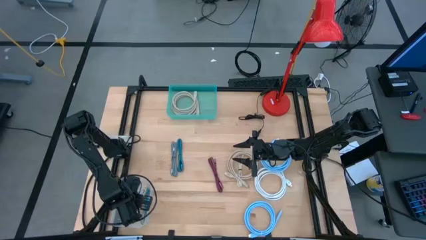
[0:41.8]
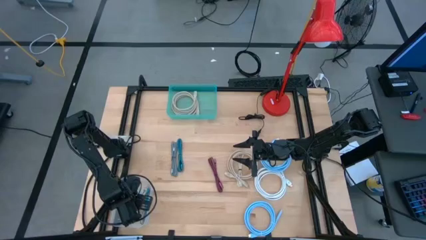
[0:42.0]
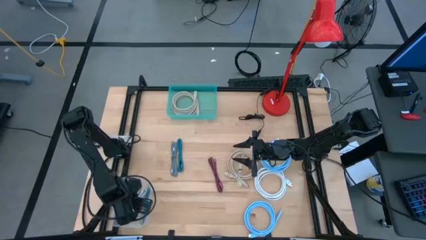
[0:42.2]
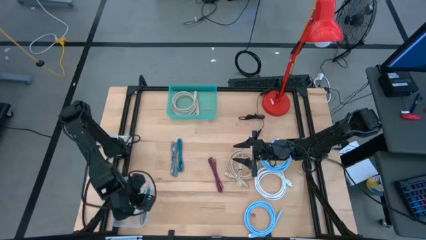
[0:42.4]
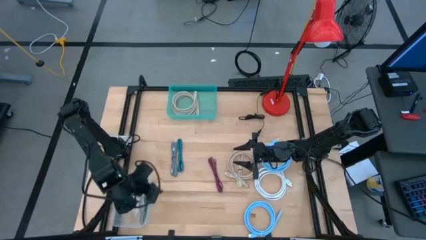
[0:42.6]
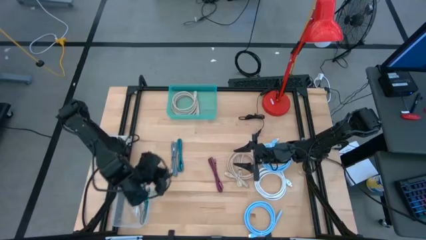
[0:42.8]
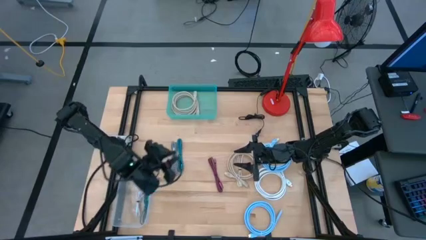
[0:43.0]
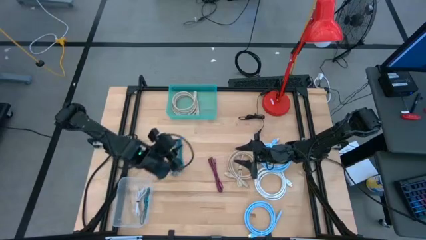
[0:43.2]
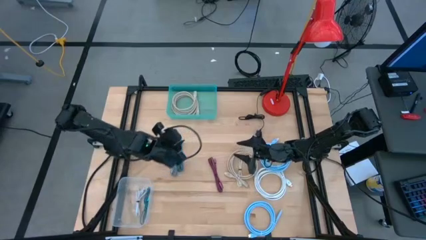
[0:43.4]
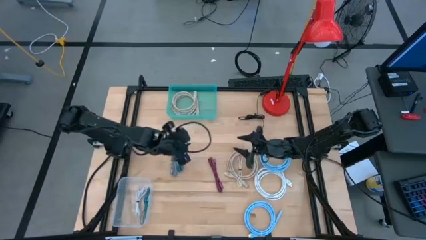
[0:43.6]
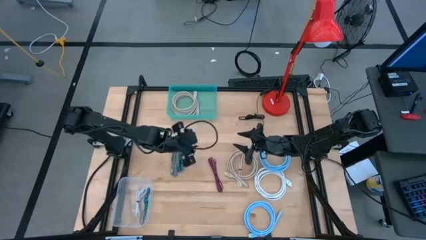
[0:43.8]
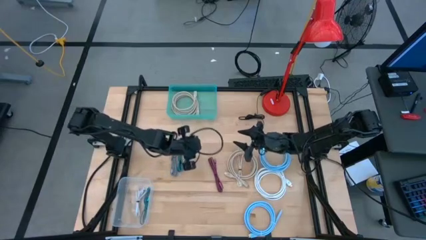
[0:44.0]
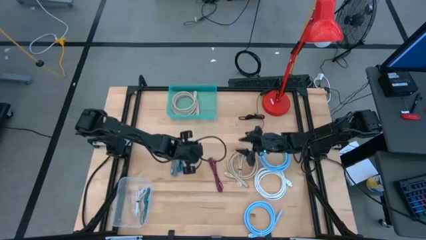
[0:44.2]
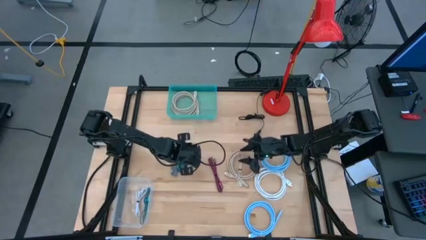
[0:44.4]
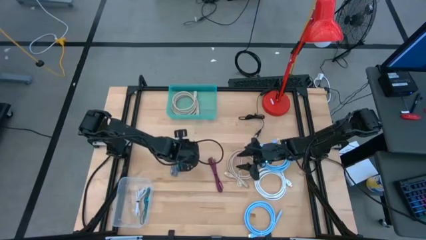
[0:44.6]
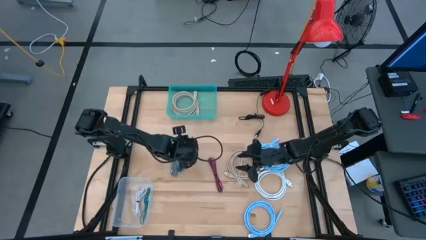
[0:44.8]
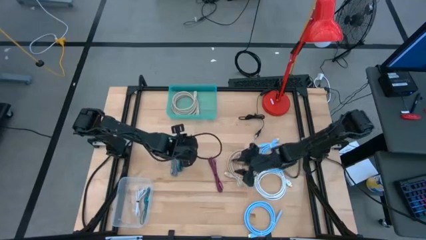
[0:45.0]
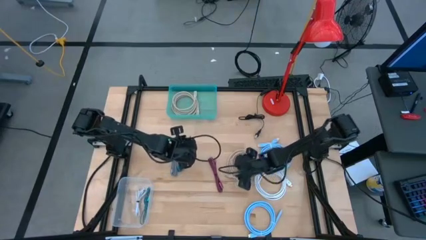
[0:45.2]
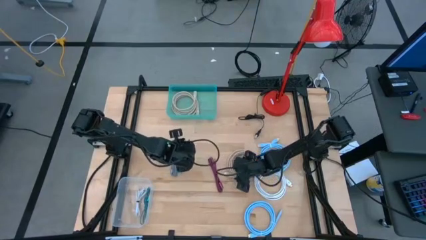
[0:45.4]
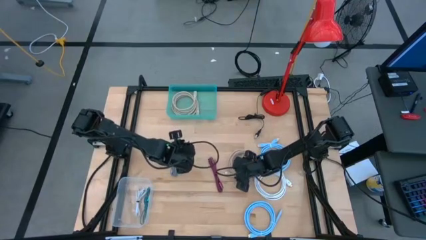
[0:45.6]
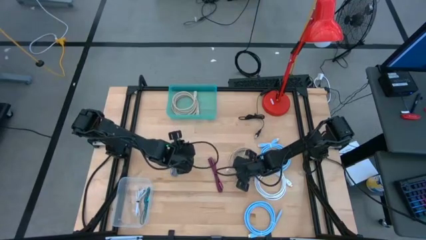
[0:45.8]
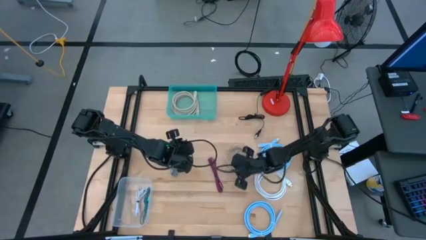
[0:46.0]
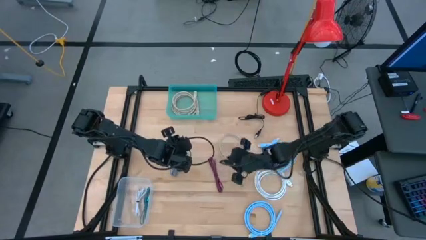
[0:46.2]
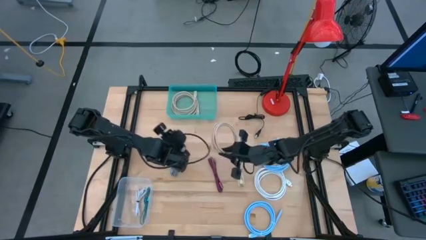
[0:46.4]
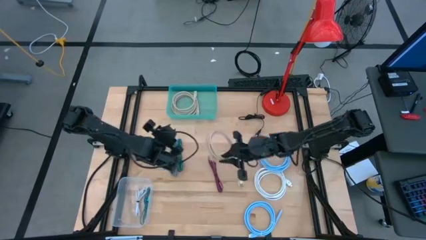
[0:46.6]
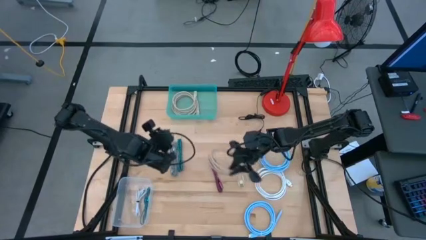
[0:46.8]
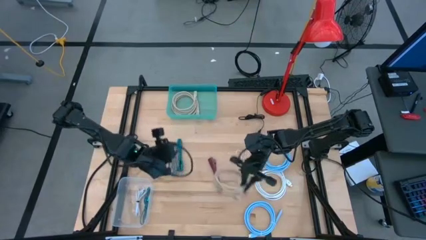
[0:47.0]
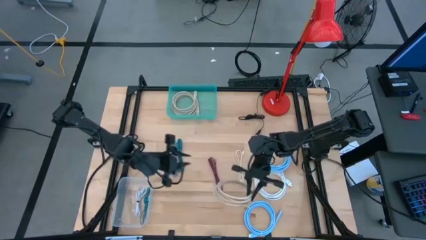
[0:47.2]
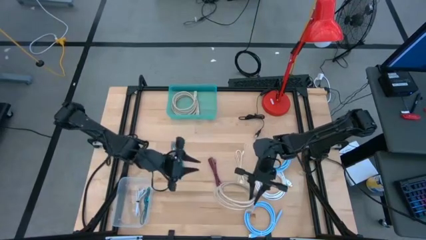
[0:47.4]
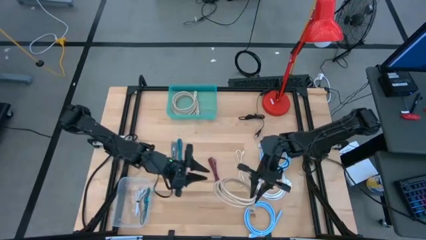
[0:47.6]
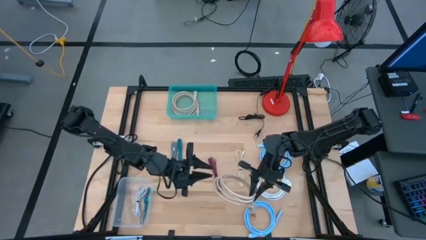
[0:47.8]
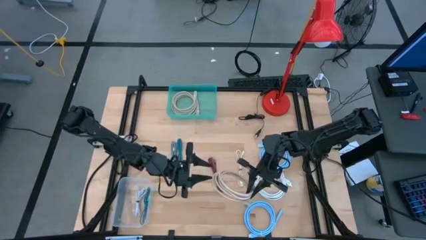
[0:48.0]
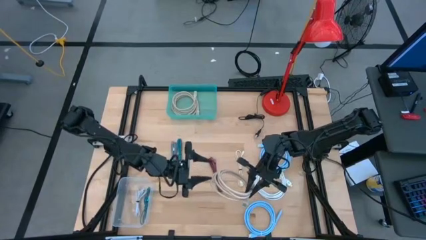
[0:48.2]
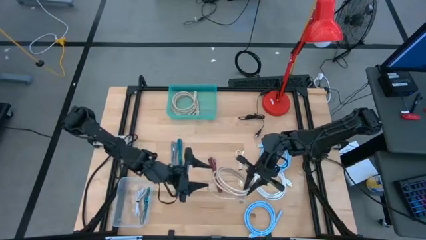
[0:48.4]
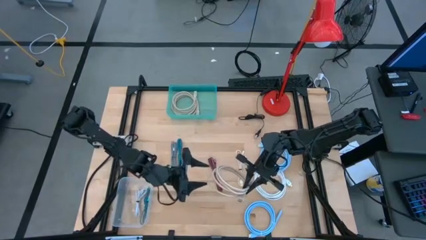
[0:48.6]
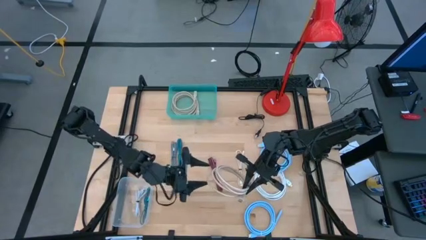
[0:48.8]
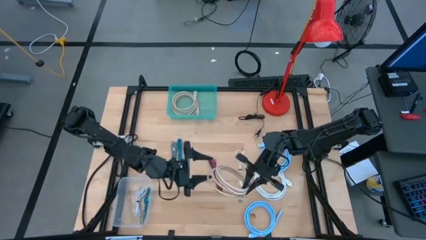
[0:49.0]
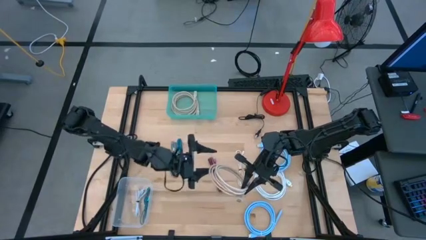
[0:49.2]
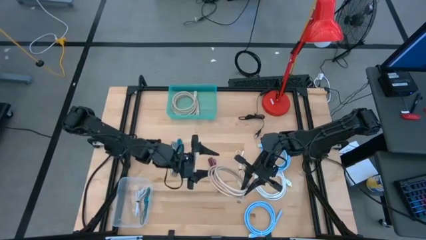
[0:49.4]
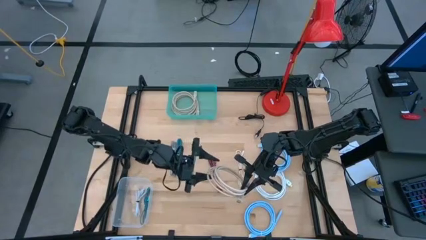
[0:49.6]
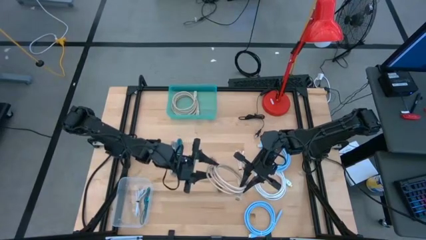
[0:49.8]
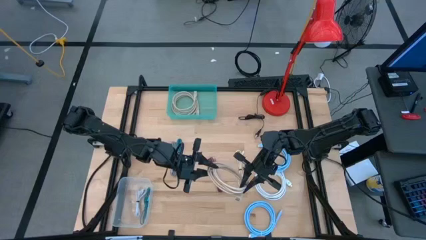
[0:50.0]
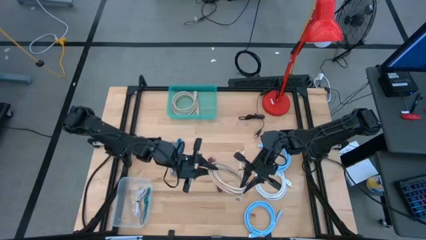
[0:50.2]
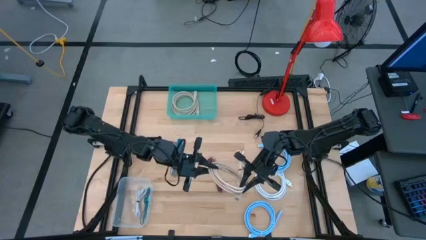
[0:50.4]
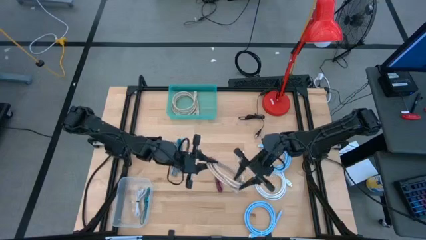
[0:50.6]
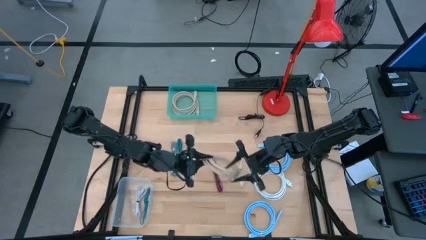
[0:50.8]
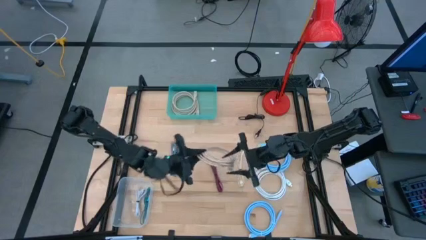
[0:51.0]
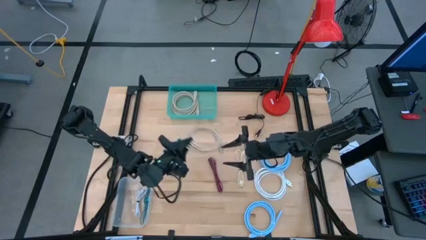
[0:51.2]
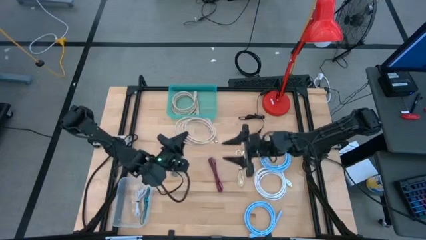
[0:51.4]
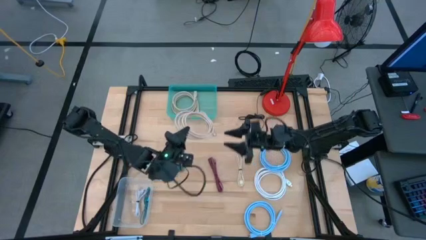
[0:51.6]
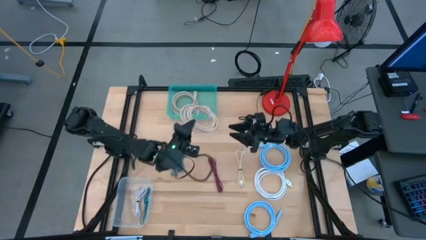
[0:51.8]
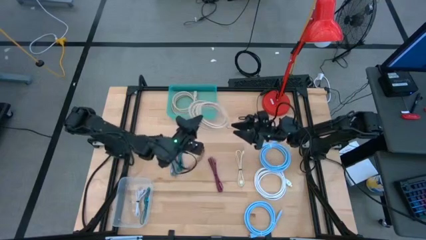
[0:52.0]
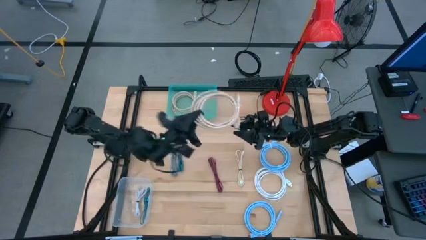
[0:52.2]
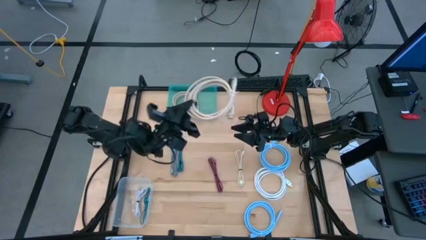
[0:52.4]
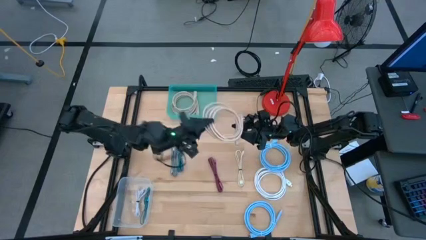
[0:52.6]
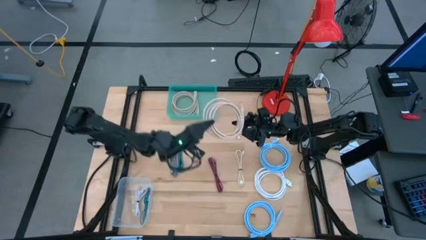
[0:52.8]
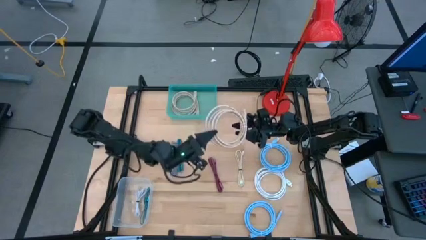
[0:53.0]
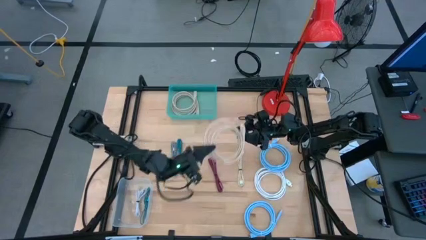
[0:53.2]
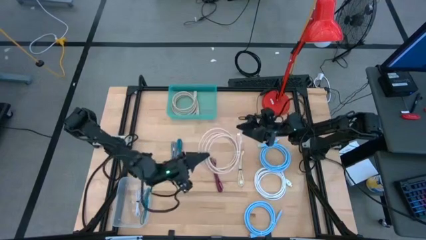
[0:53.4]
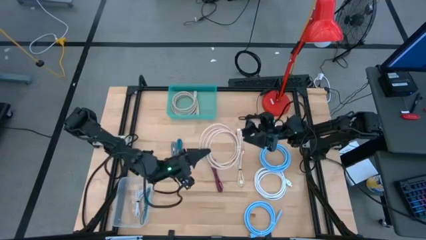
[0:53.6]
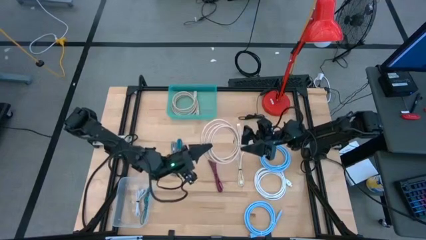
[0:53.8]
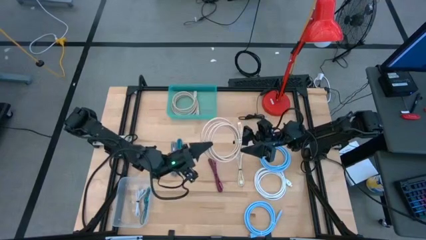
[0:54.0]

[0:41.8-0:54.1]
Task: Pick & Place USB Port
Put the brown HDMI cable into the green bin

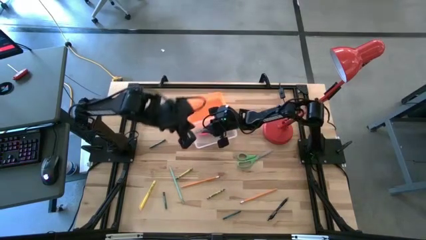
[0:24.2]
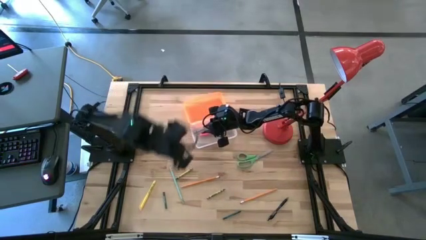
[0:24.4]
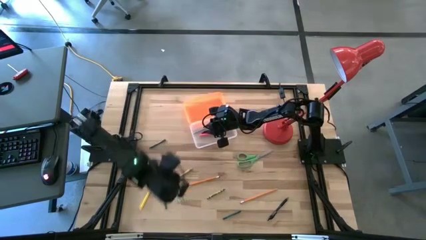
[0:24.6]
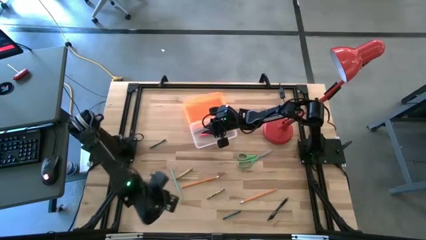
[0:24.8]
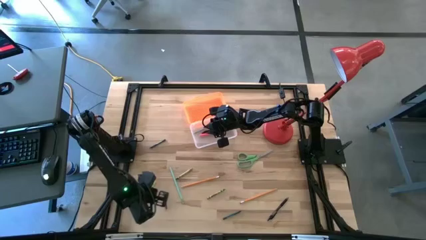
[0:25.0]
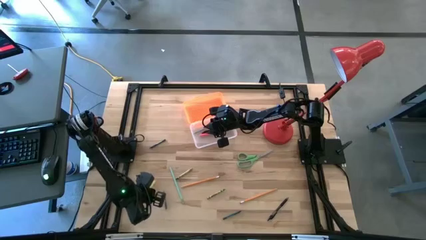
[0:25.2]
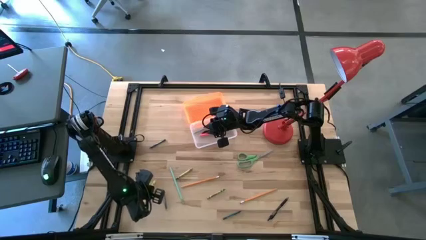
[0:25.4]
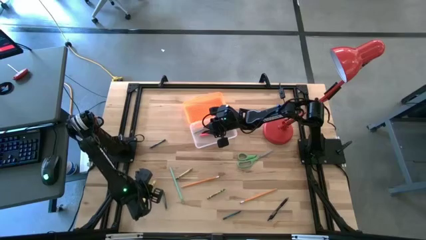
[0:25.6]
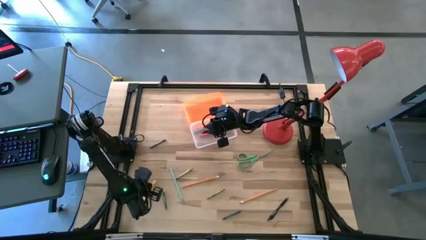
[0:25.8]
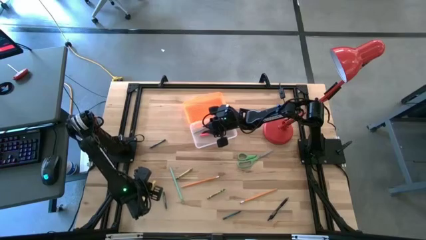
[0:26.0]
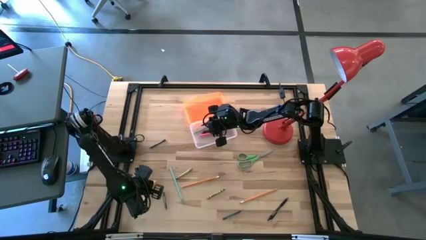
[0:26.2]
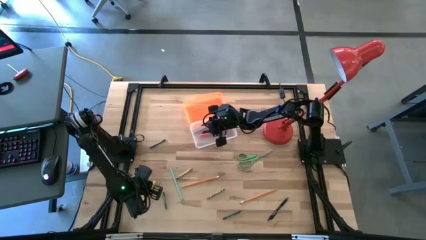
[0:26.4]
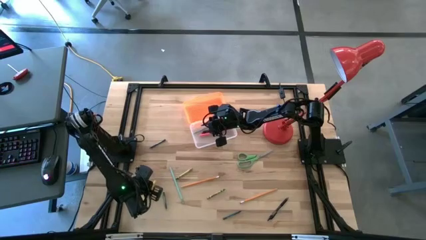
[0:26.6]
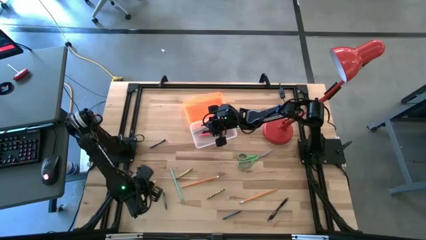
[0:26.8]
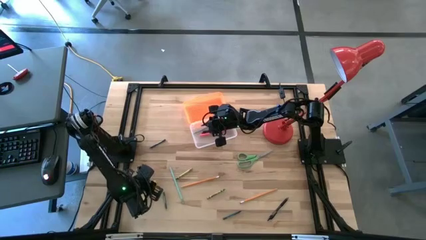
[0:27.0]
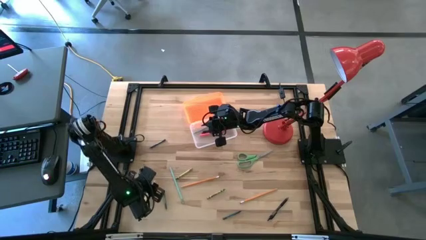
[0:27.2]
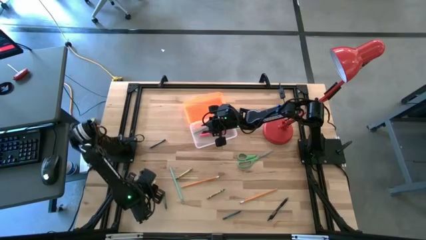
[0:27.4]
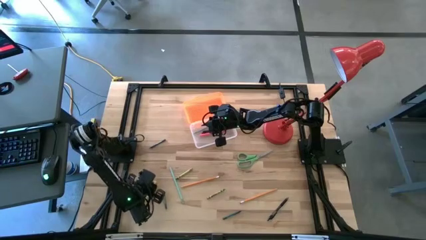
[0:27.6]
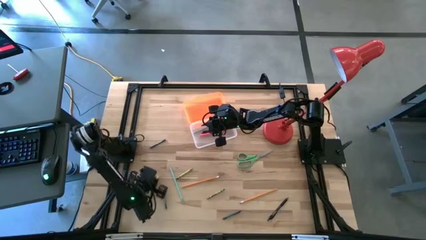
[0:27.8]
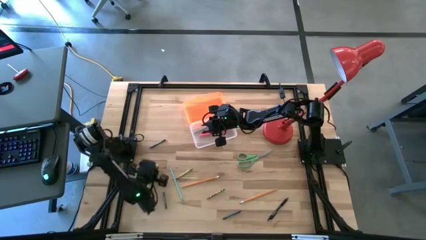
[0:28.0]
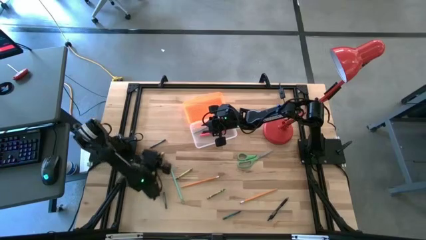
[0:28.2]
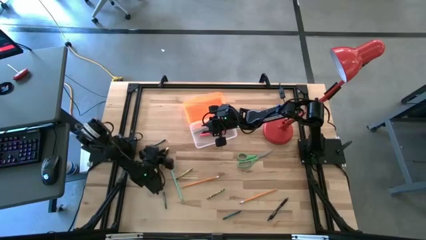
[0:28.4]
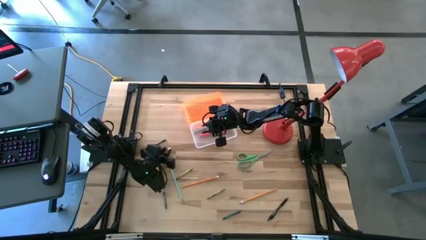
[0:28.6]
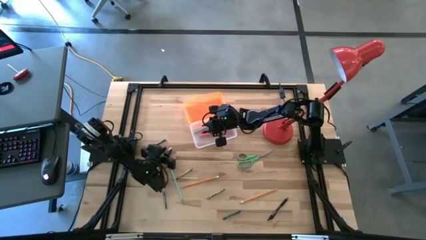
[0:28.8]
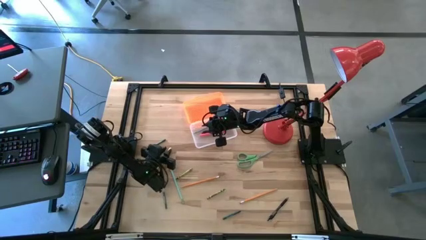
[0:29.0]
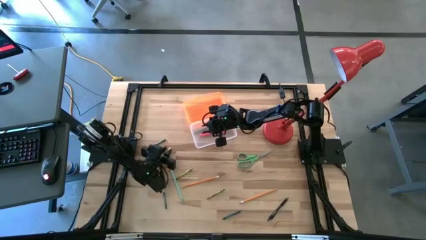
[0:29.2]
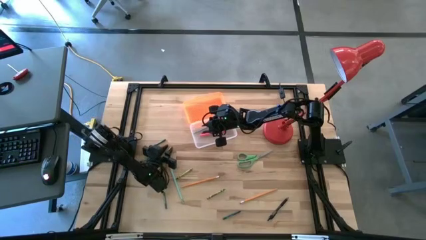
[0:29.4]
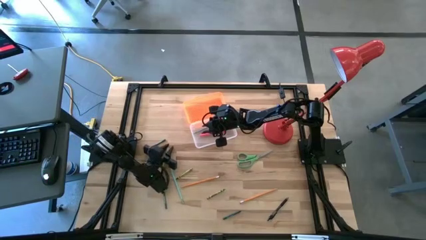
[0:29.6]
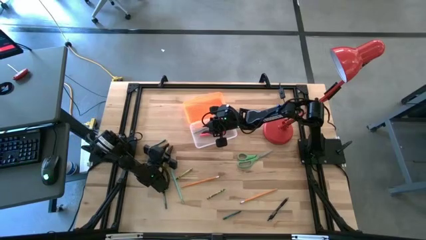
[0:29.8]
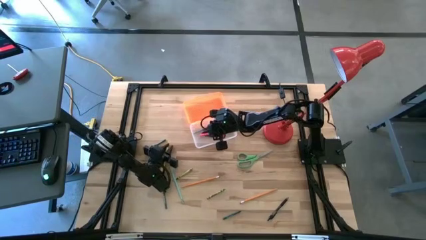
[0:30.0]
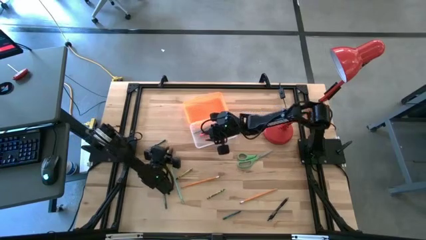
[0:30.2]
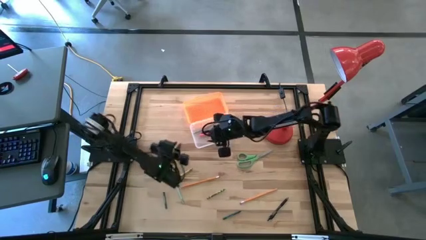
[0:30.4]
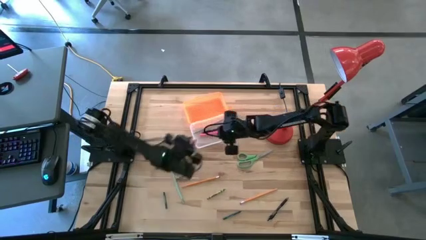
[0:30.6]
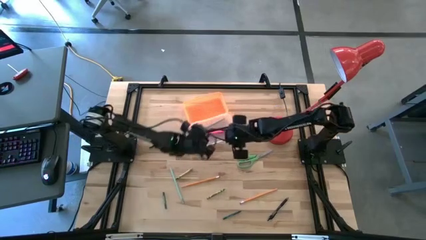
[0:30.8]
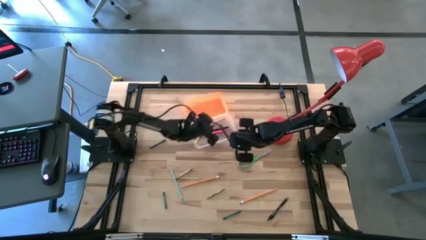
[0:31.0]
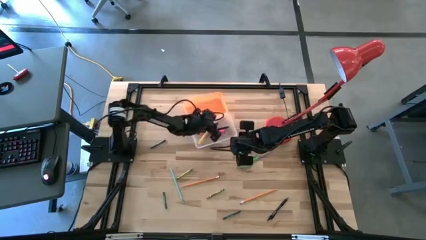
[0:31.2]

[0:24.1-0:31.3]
Task: Pick & place school supplies into a supply box
Put the yellow pen into the orange supply box
